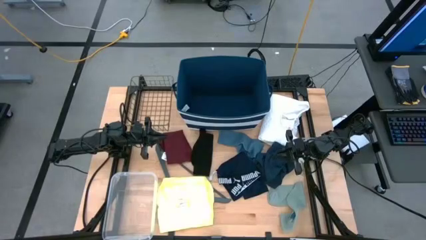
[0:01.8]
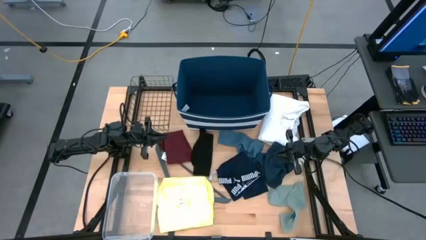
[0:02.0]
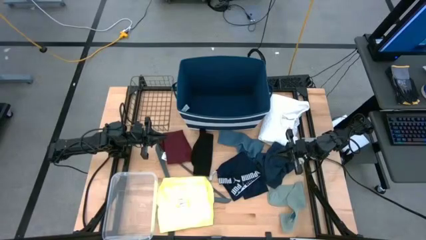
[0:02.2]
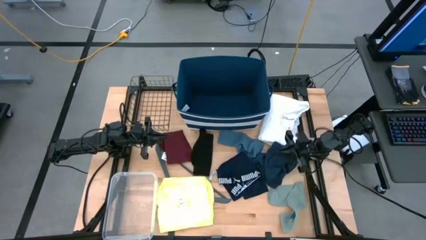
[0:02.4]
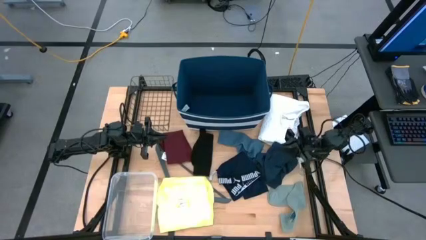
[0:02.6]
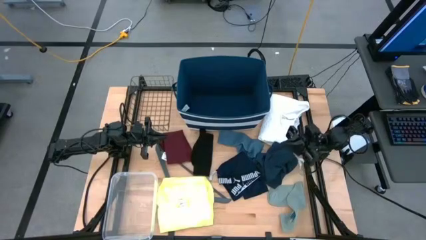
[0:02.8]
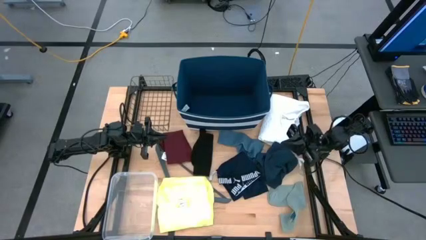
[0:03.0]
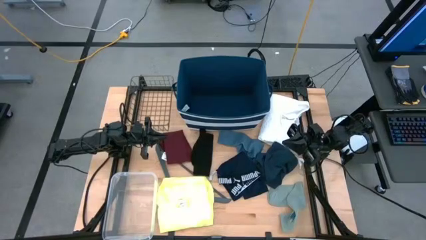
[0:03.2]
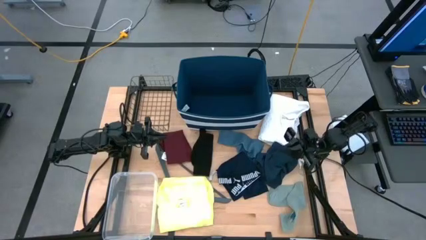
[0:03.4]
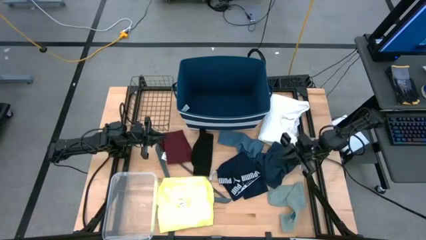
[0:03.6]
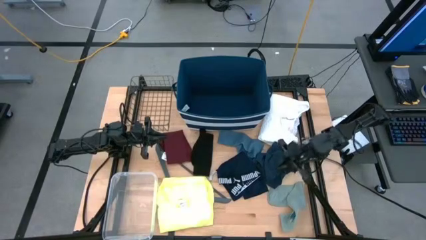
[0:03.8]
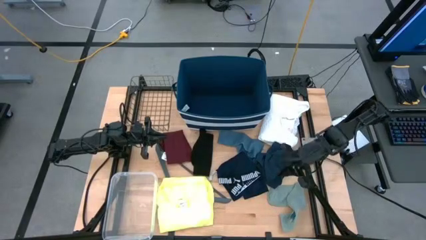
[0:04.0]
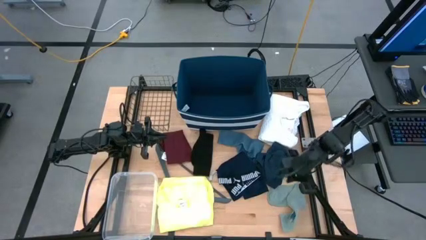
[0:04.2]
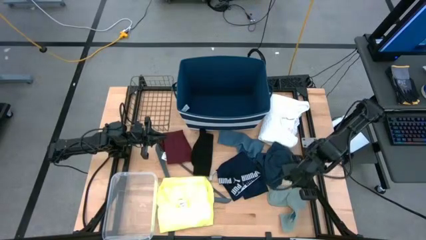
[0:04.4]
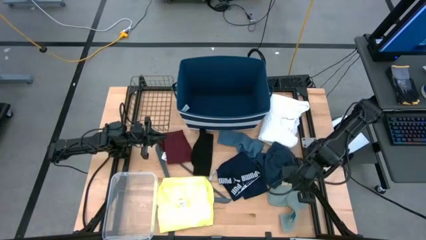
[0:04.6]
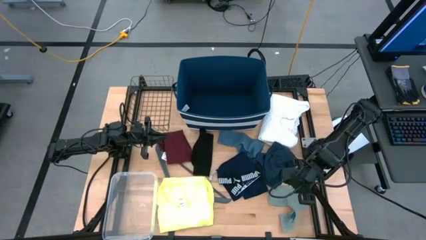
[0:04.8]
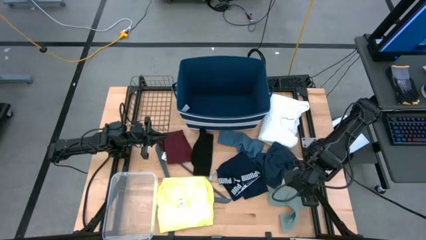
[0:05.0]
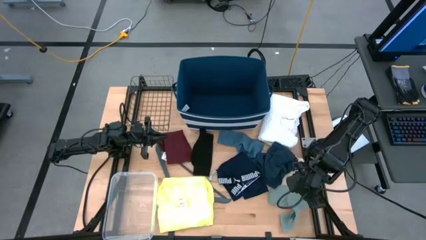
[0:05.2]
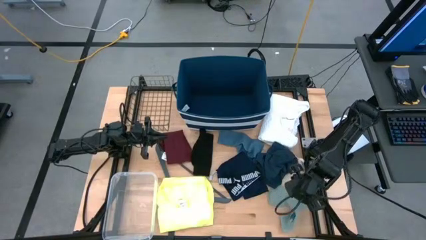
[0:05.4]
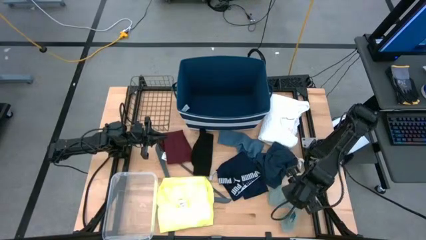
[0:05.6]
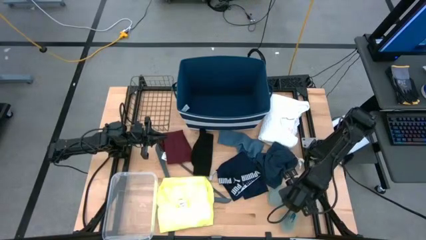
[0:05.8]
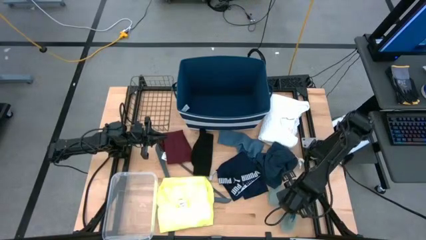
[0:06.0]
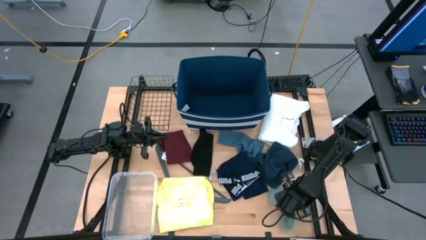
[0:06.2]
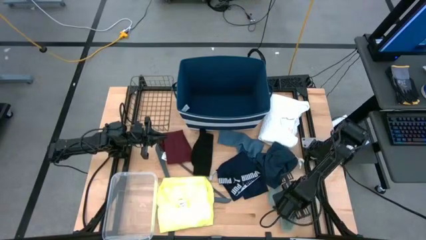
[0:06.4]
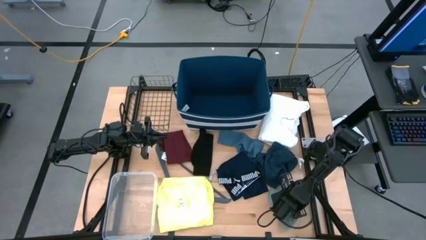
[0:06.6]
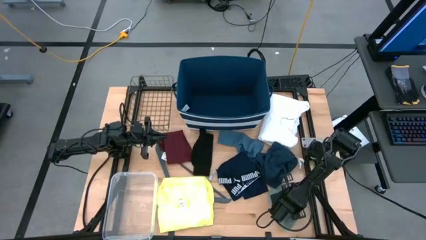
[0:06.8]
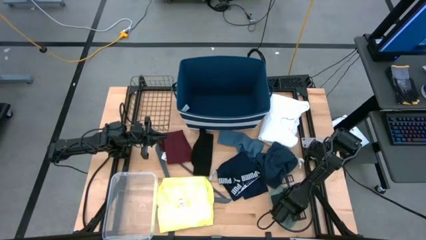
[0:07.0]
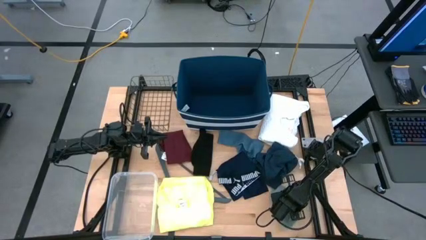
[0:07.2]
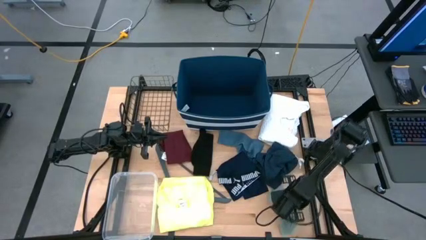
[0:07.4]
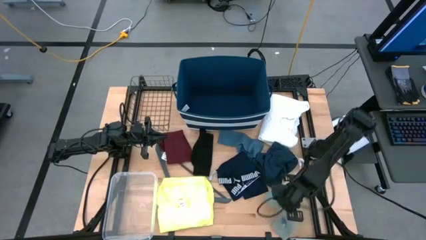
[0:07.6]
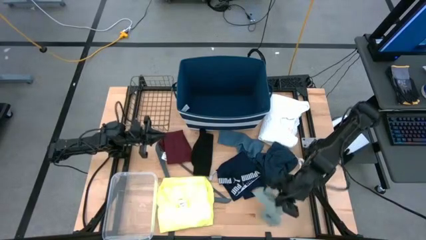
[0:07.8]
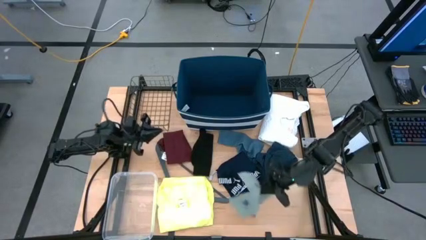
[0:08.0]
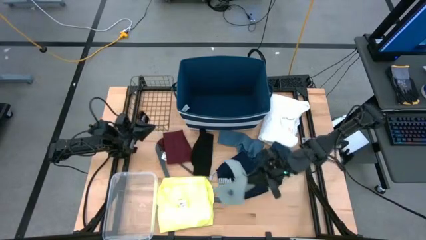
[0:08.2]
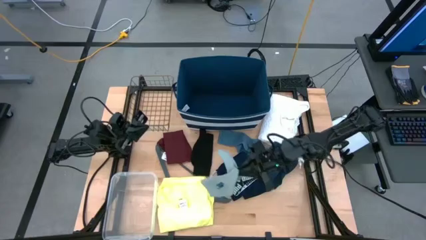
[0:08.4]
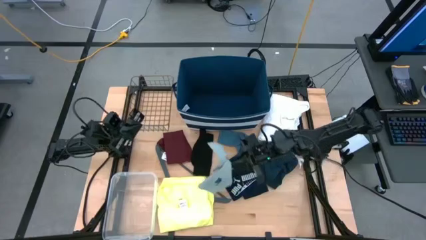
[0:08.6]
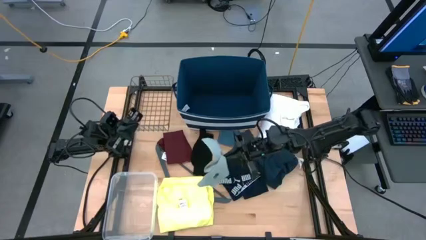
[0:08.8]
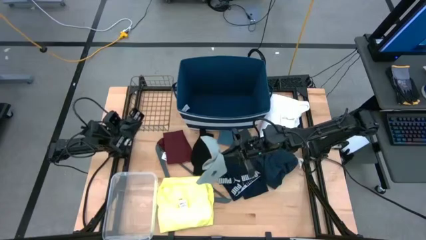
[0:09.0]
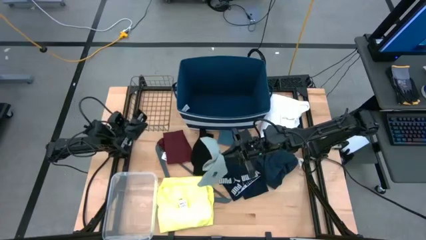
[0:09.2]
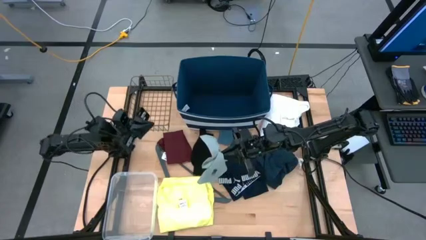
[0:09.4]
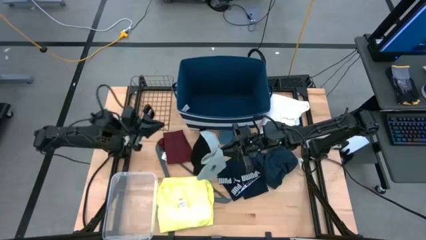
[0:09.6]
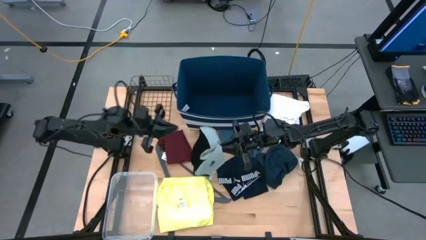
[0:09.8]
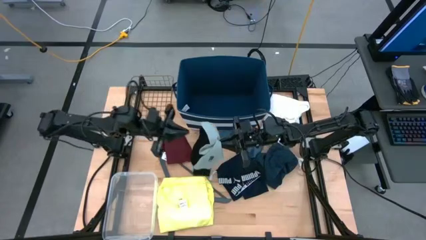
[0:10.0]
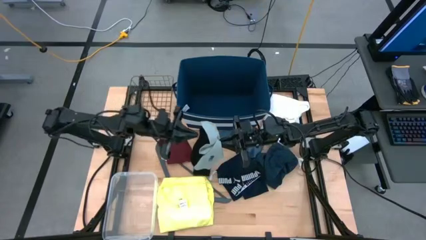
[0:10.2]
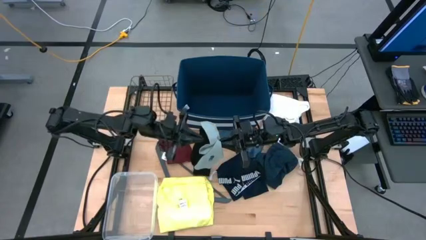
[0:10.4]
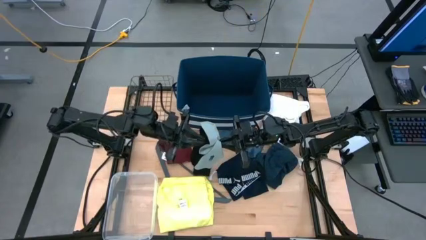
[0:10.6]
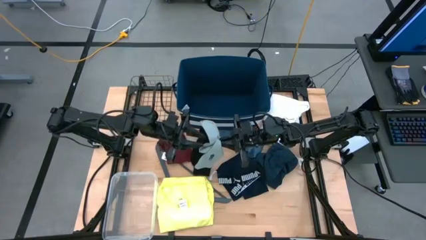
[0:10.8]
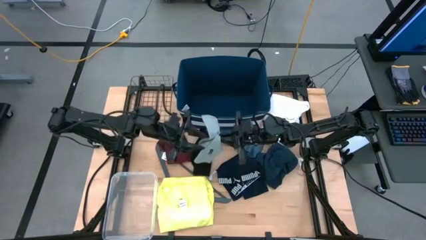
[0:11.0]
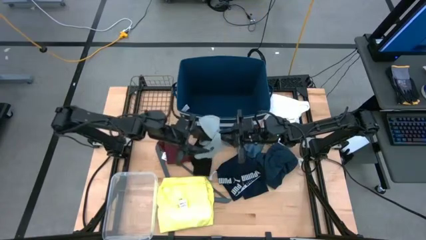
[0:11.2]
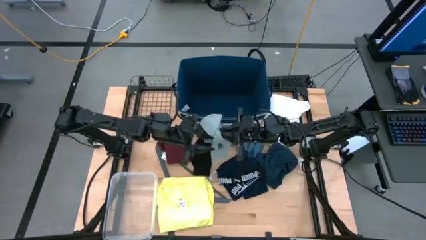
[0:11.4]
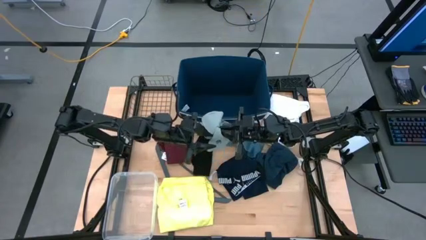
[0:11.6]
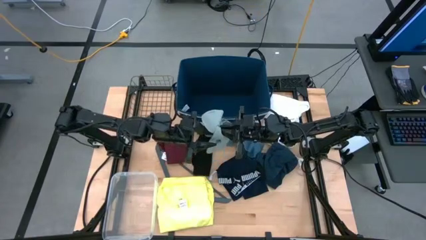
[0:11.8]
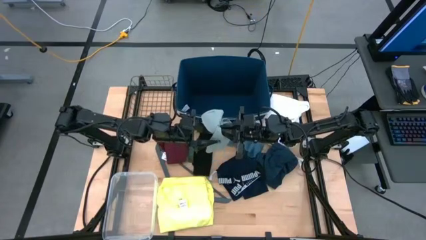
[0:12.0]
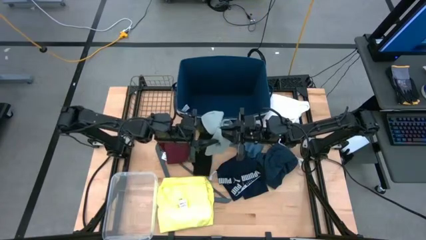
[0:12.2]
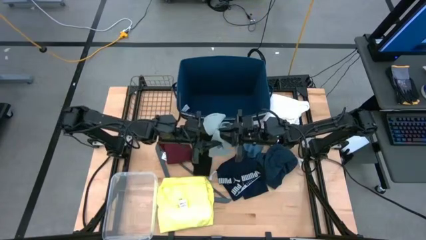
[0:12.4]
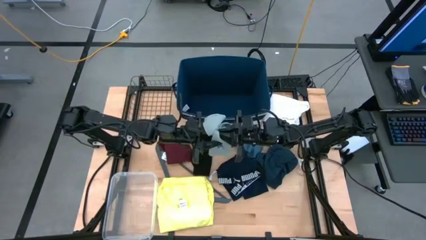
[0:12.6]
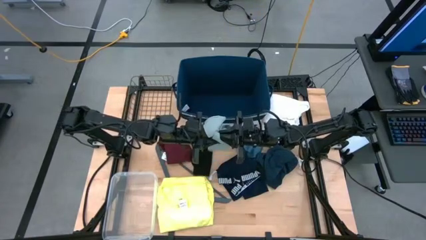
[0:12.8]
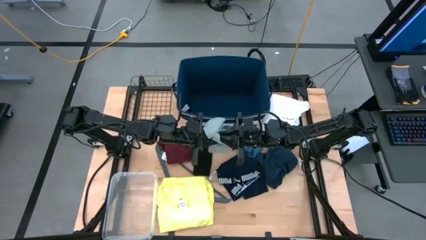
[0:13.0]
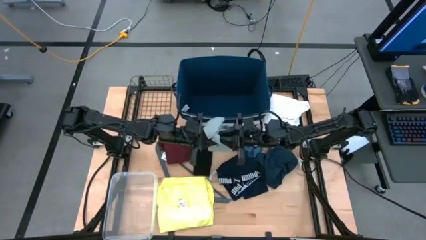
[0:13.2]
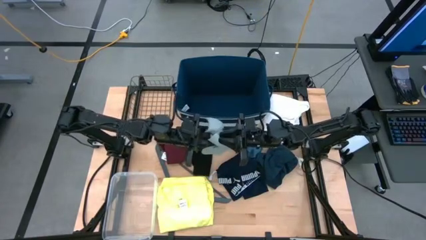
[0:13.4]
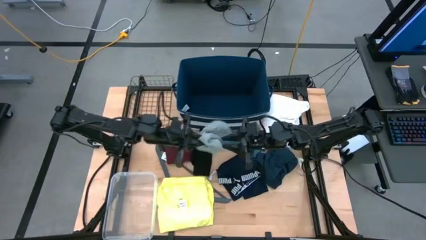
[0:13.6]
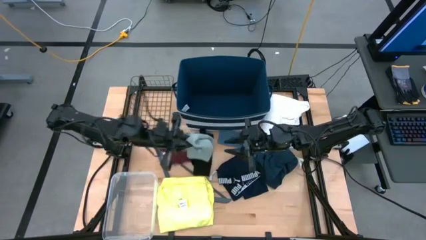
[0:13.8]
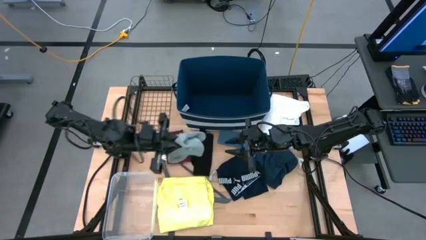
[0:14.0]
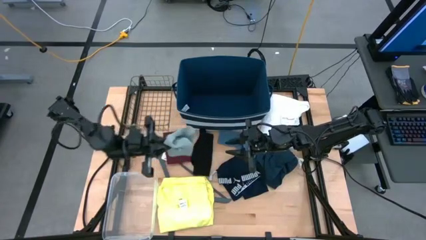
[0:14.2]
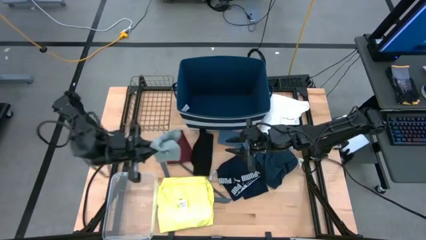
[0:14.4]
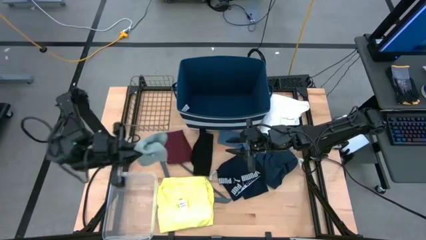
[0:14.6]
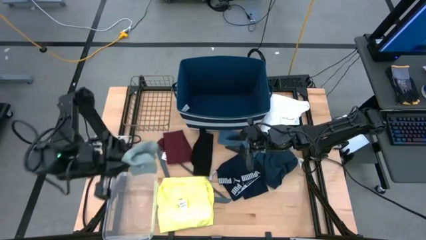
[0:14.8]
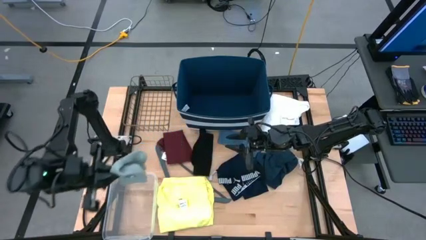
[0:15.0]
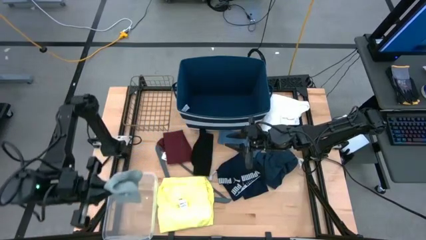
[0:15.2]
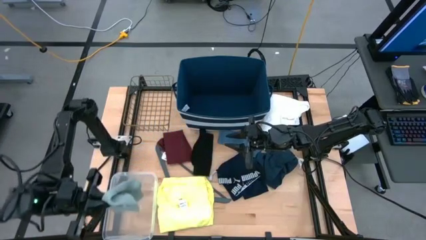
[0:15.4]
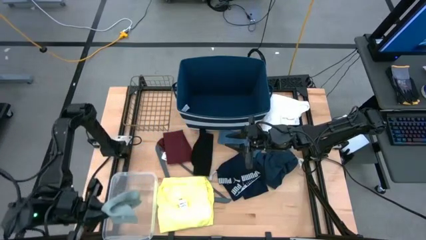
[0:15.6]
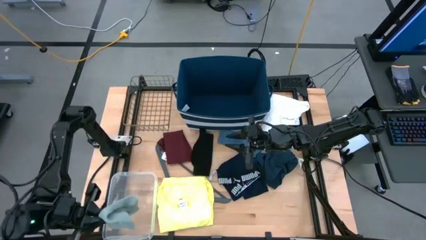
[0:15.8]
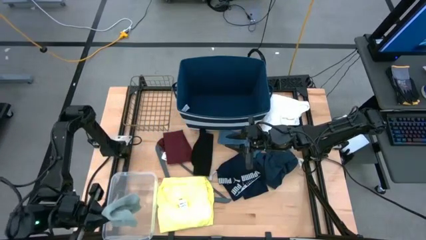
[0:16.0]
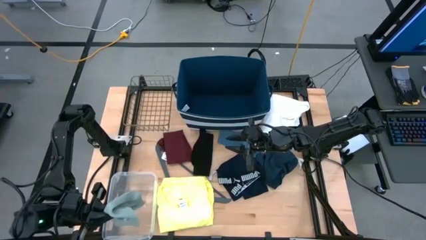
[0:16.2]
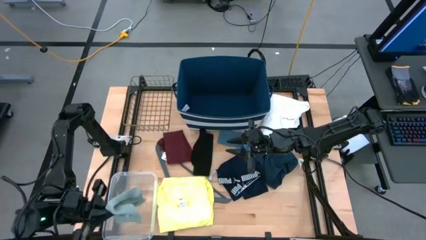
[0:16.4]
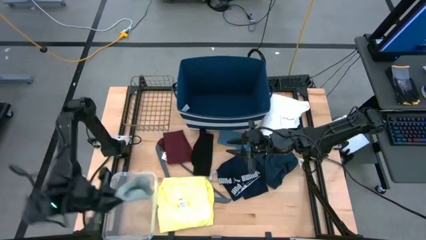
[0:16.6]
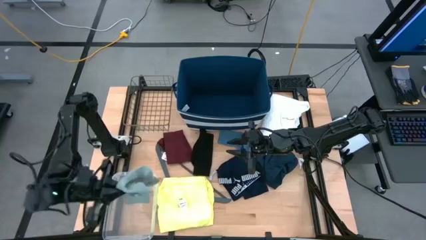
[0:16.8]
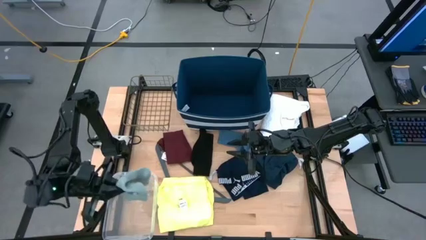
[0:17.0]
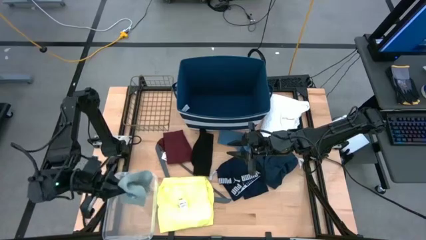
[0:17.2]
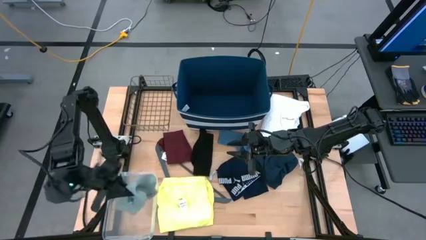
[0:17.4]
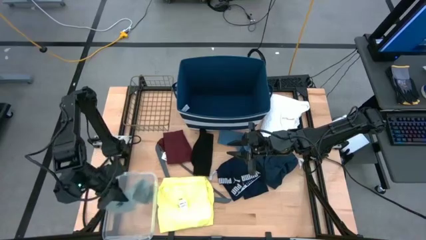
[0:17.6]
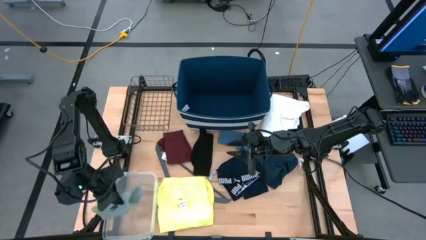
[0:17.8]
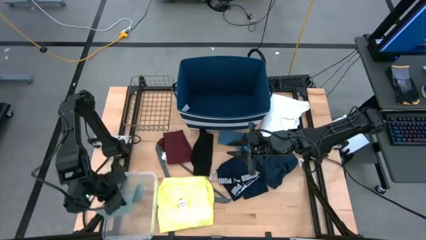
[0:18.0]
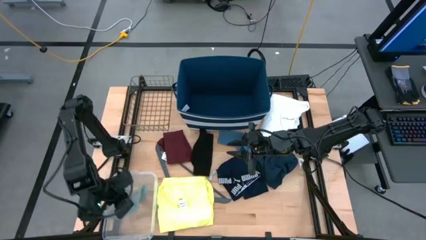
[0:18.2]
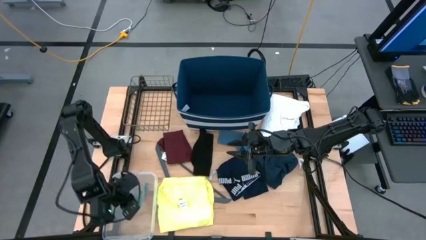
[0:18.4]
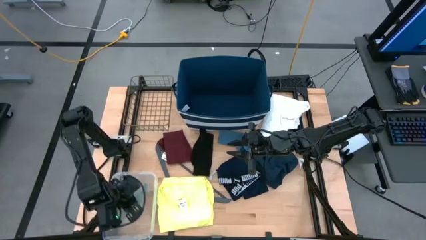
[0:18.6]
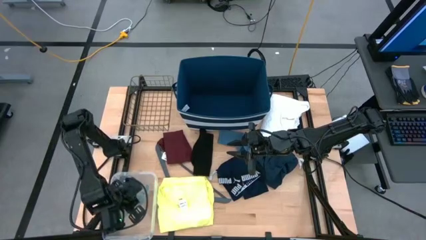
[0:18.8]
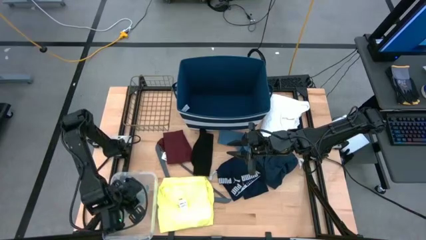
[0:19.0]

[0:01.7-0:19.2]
Task: Pick & Place Cloths
Put the light green sock into the transparent bin
